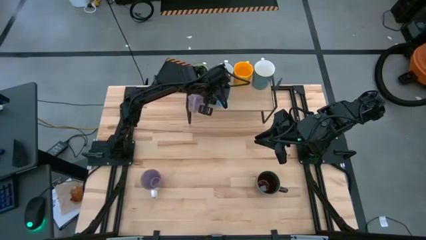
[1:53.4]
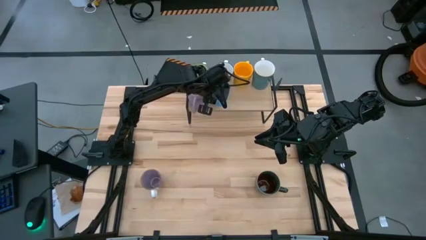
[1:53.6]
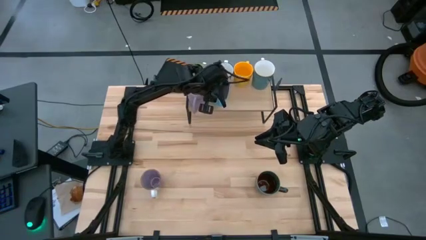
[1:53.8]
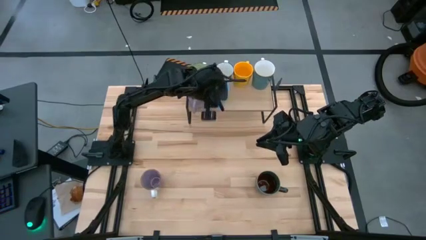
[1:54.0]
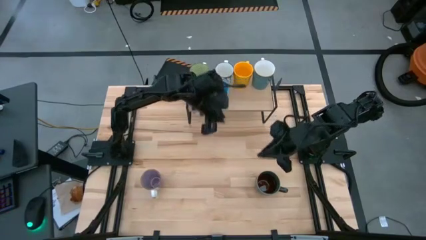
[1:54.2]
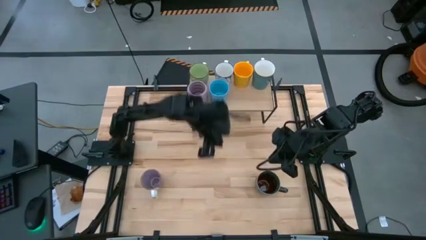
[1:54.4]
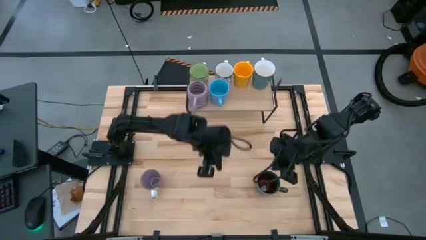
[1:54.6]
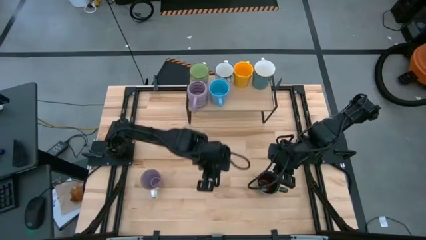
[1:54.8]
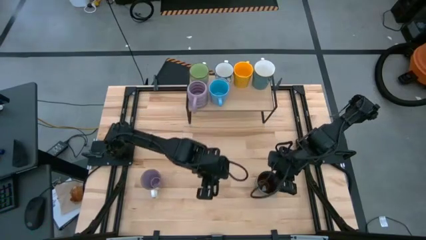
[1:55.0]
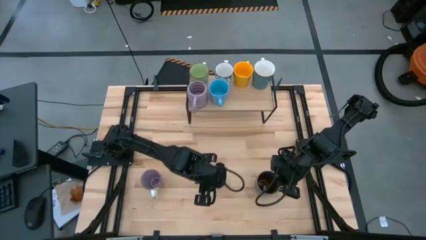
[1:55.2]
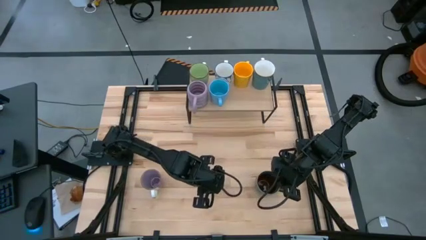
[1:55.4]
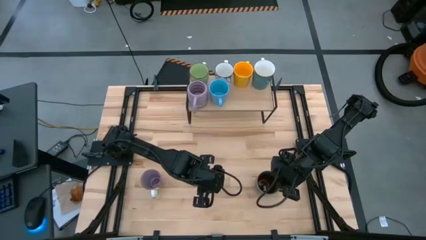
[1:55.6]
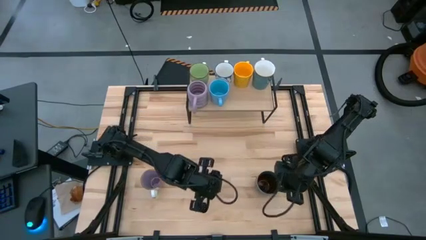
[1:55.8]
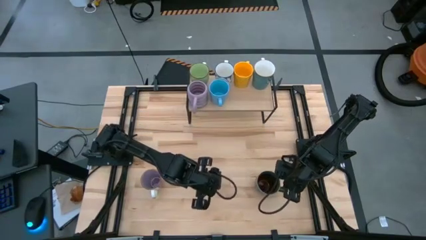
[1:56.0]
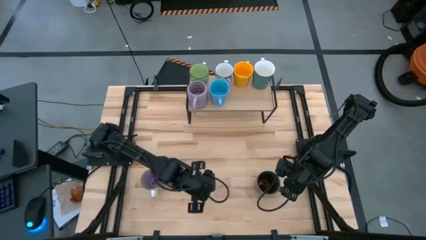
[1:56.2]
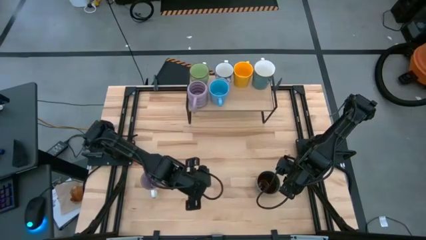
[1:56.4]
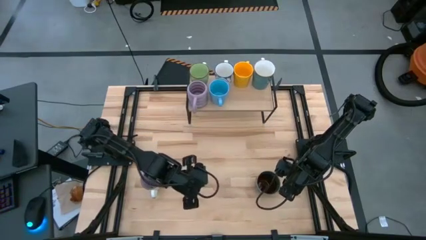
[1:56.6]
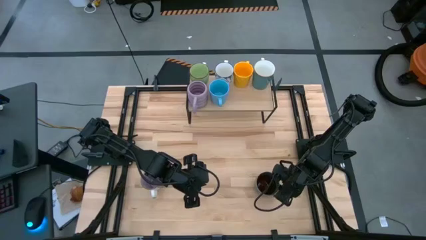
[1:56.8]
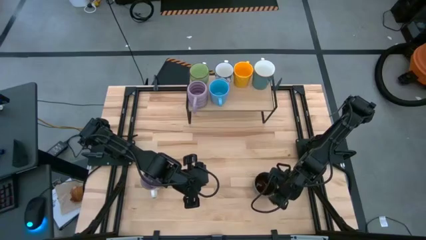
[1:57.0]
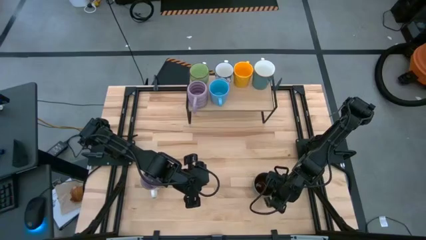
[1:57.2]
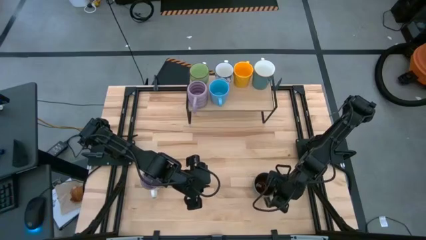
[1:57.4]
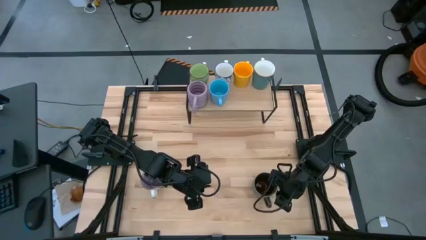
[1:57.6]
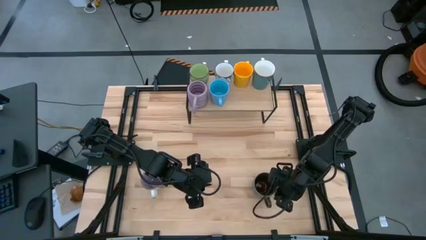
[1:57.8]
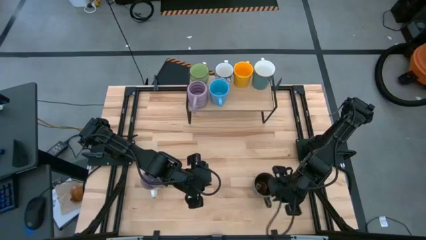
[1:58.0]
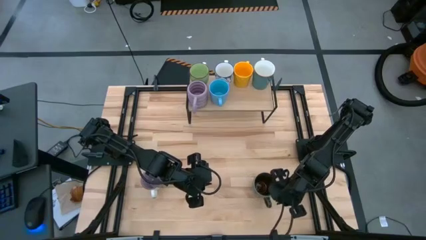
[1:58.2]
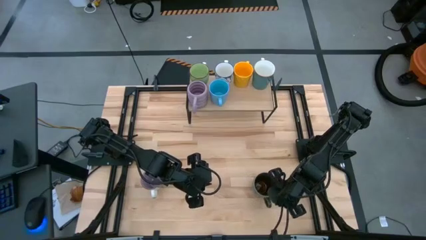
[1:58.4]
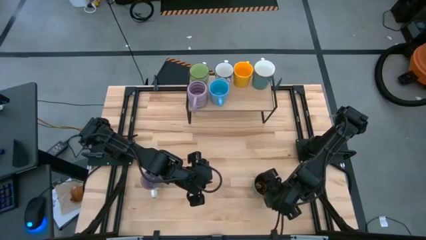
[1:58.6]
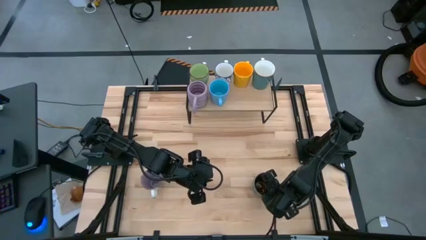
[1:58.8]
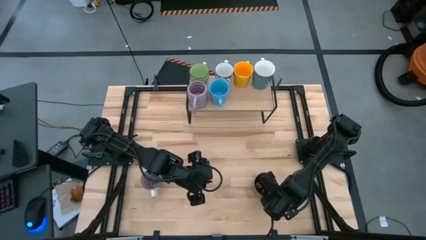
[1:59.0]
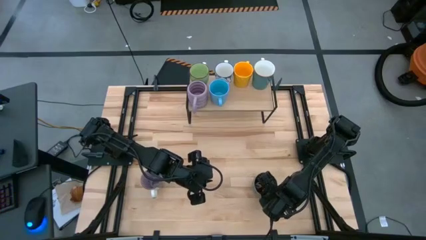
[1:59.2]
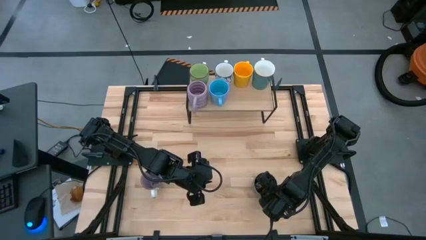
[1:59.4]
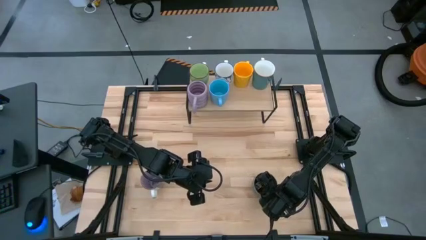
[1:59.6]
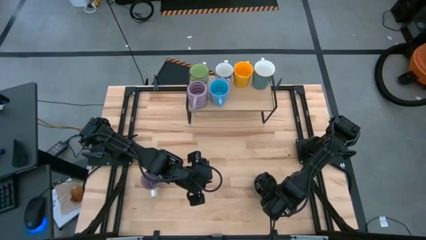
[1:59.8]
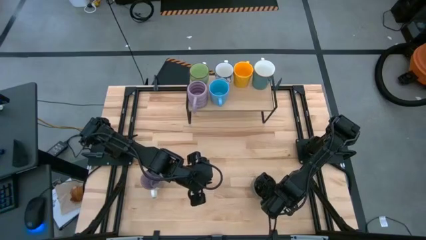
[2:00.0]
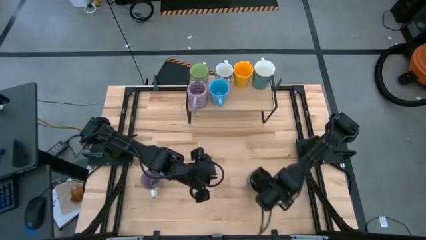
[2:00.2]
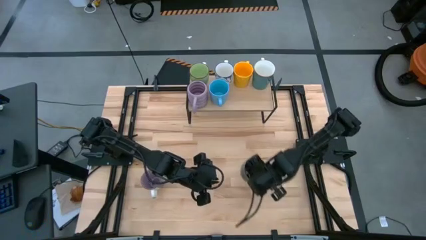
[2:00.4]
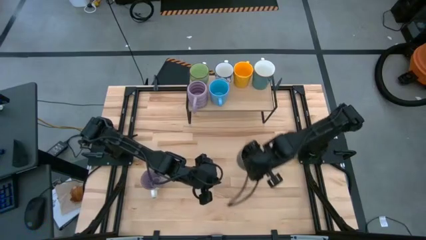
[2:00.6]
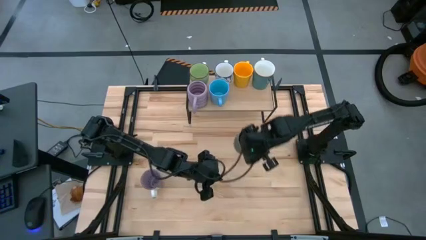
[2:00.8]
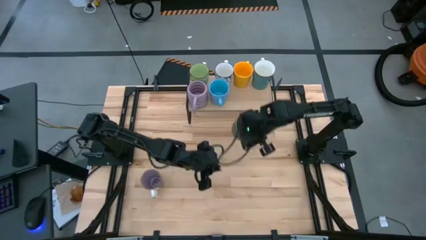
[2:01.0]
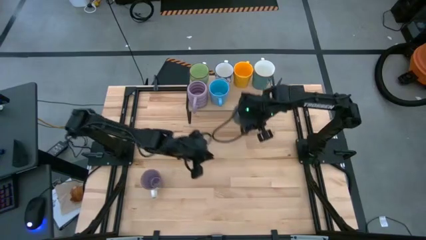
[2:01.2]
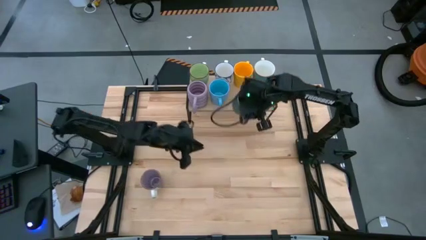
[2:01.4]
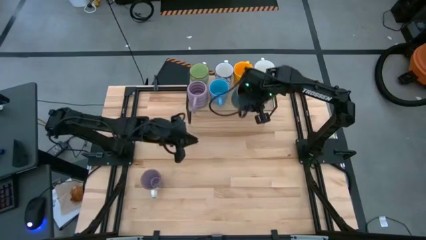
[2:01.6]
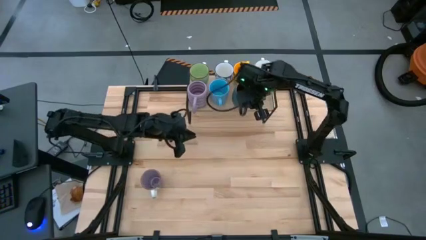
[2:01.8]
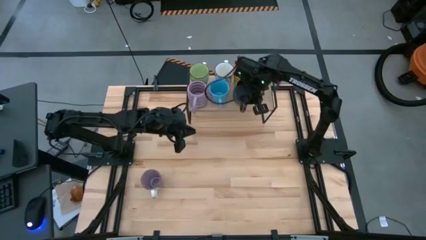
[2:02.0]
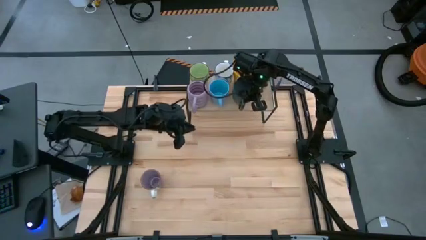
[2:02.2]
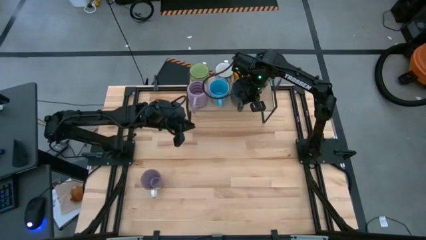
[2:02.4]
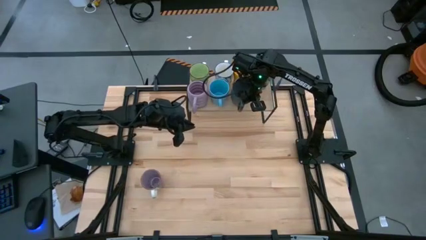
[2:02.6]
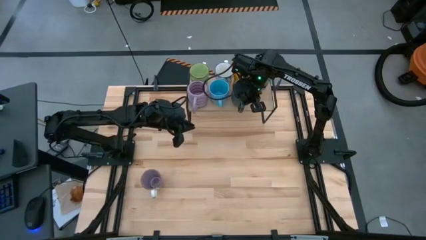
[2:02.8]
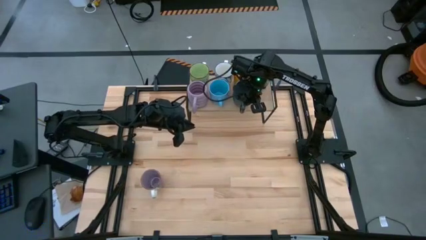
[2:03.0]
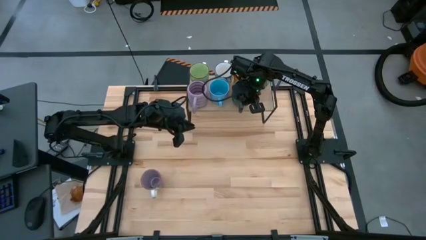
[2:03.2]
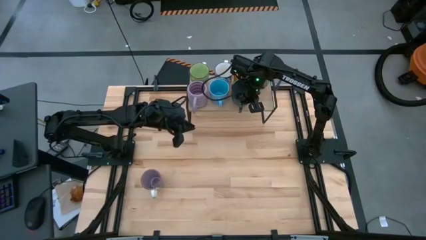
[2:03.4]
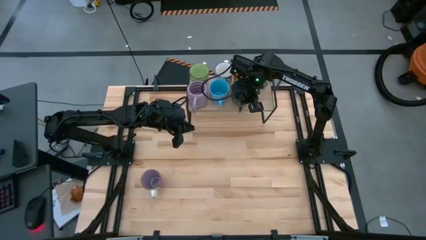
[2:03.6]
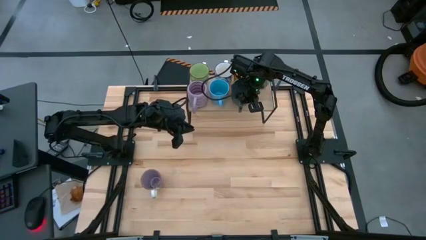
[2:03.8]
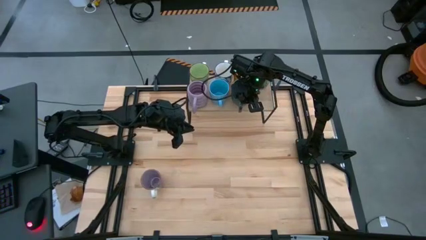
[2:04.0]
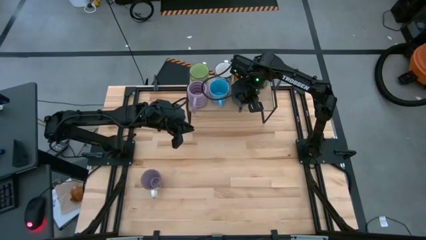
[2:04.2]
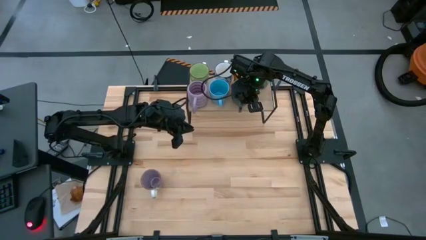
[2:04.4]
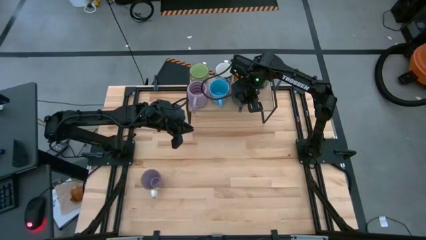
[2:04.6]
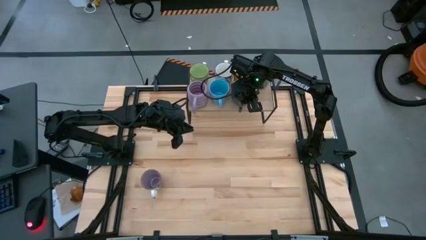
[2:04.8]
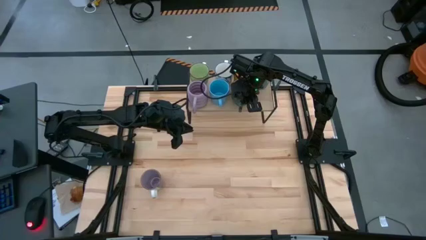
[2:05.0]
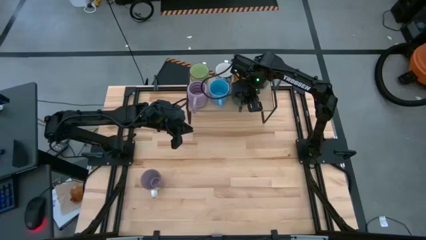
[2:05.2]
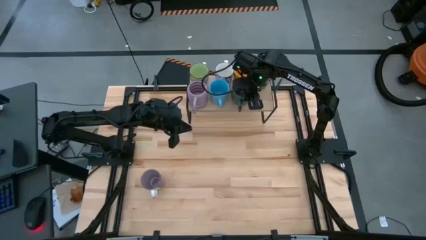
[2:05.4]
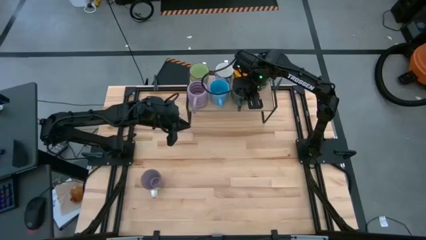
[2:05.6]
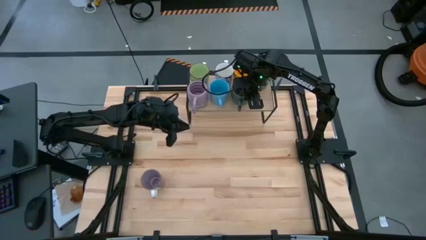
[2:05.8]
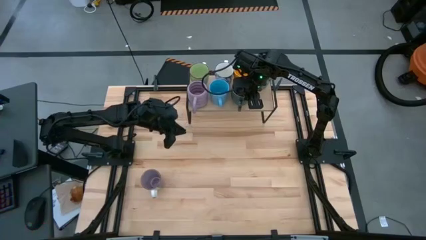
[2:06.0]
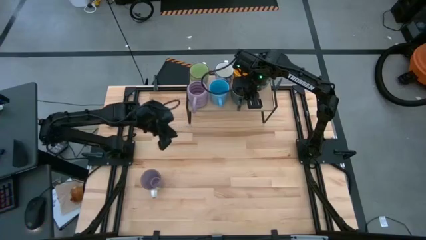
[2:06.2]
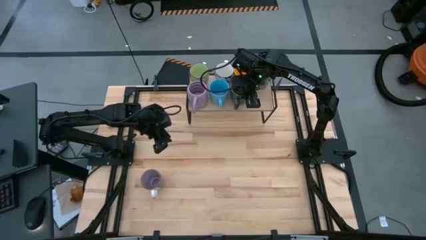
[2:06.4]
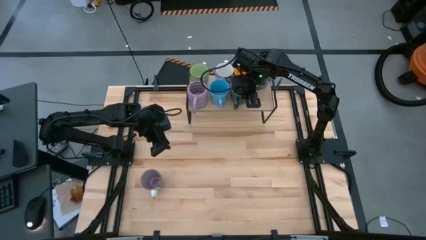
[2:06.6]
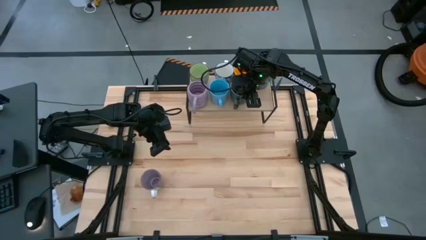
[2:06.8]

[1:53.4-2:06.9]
Task: Place coffee mugs
Put the brown patterned mug on the shelf

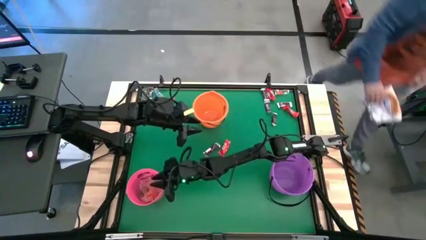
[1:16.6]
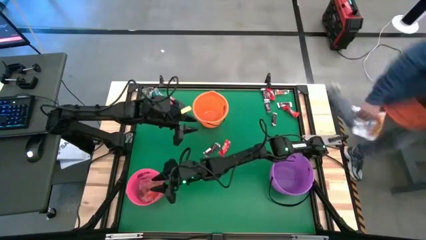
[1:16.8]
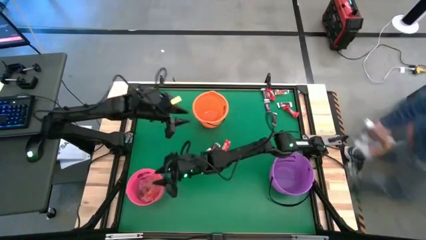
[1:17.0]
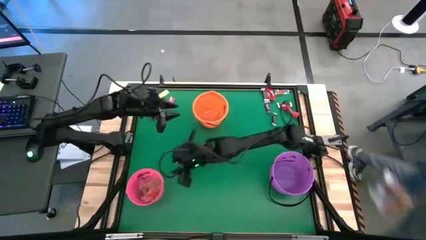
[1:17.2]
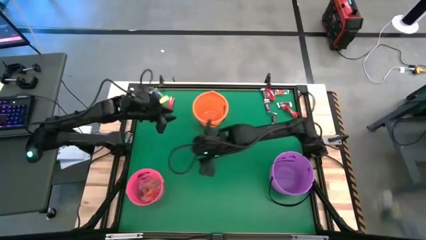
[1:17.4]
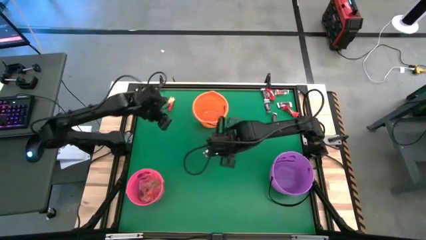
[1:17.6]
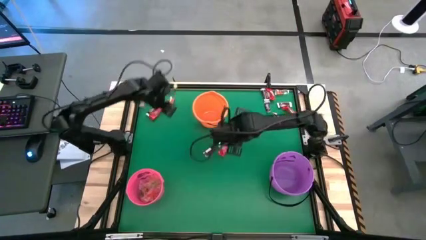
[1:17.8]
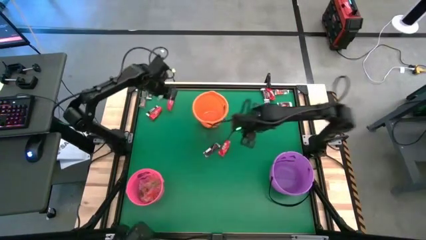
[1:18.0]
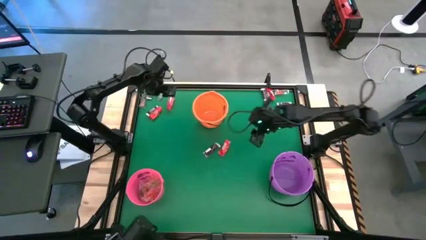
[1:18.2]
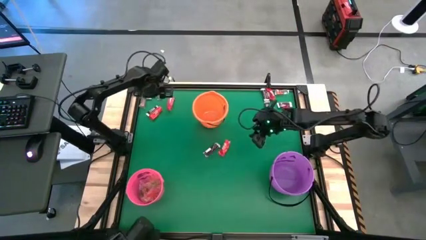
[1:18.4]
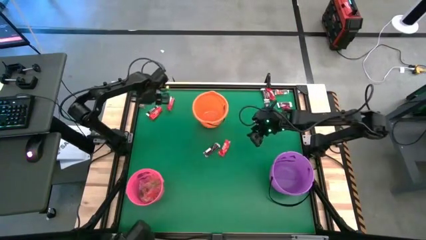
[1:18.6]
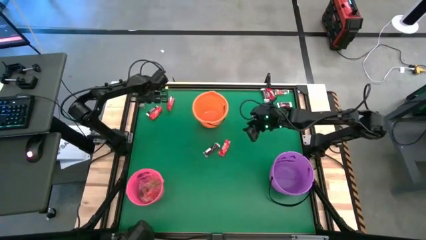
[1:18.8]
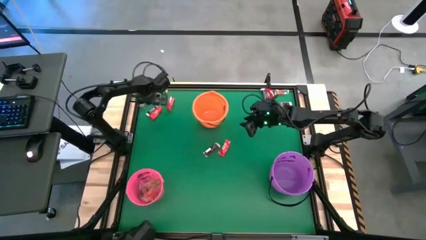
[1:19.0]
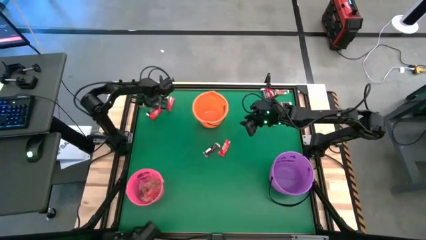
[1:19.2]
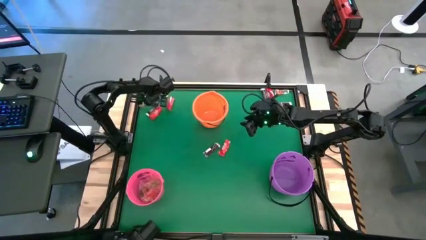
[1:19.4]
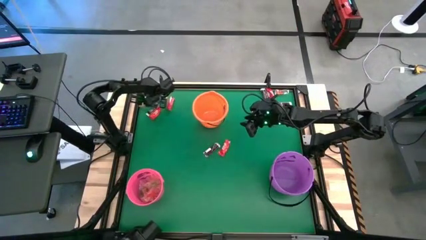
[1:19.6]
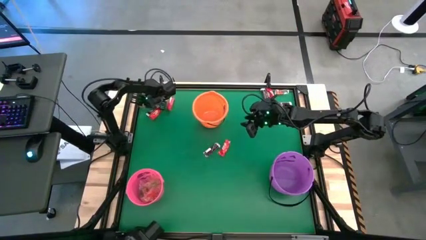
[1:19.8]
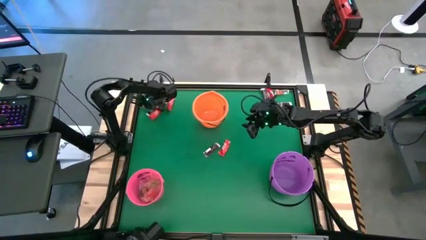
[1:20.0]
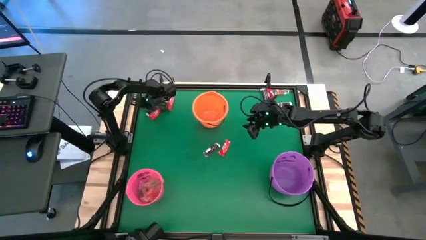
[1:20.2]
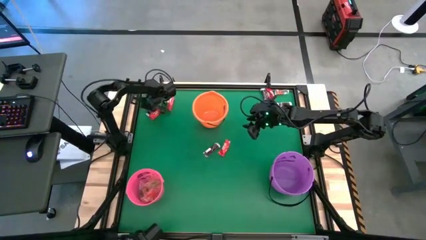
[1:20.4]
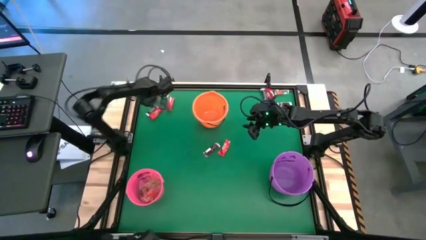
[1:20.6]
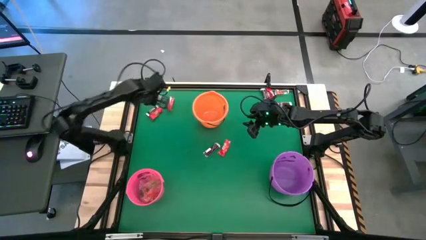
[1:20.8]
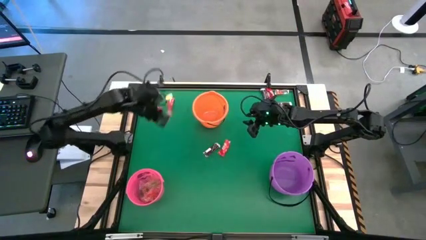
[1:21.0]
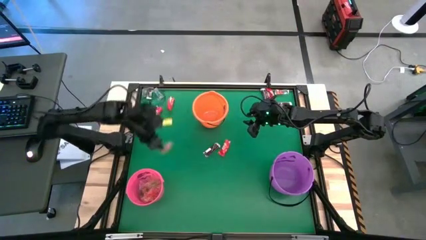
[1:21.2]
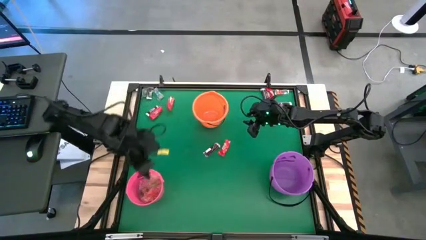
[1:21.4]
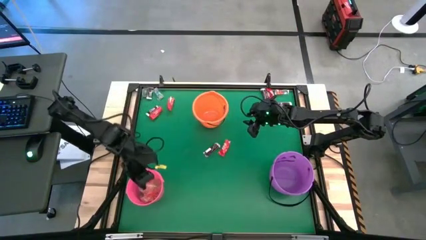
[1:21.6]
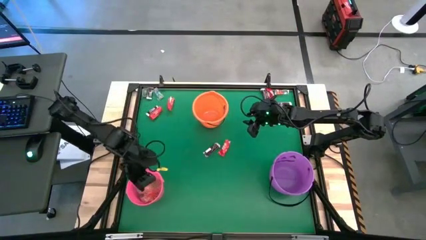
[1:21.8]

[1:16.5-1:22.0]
Task: Sort candy by brand, put in halloween buckets
Put the orange gummy into the pink bucket
